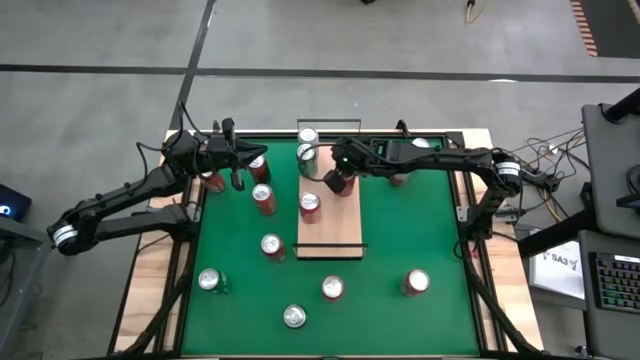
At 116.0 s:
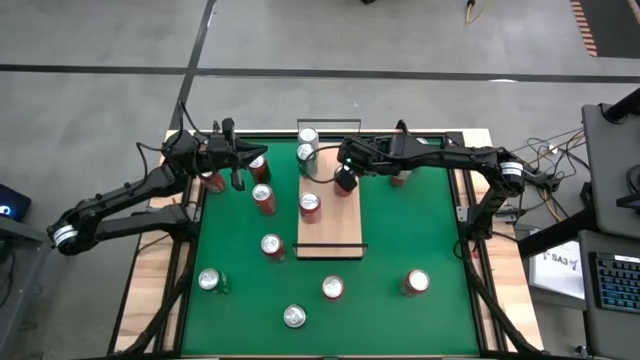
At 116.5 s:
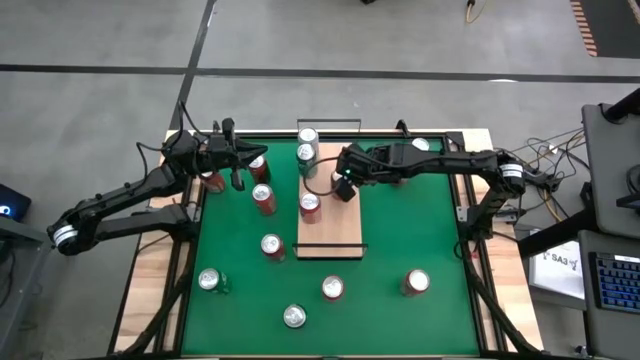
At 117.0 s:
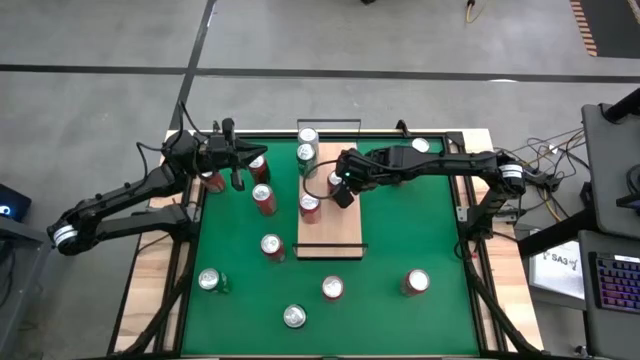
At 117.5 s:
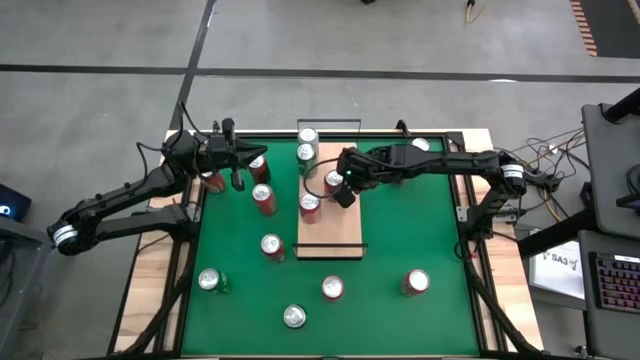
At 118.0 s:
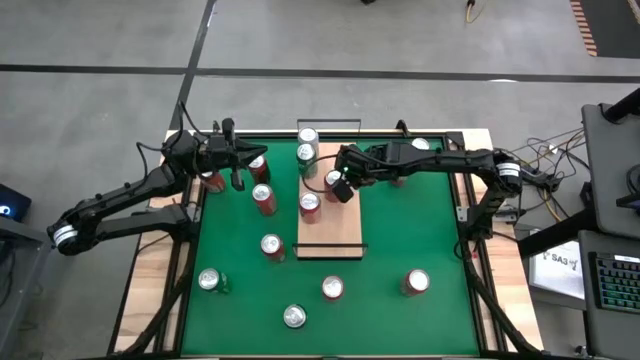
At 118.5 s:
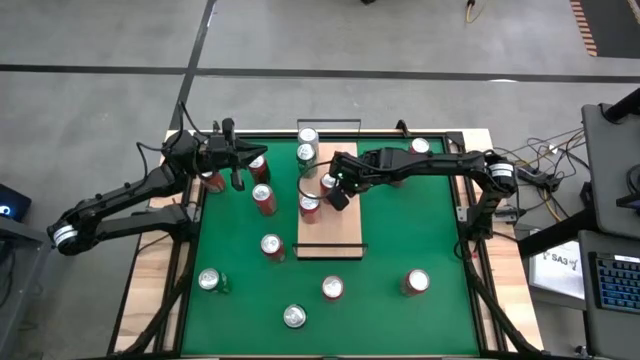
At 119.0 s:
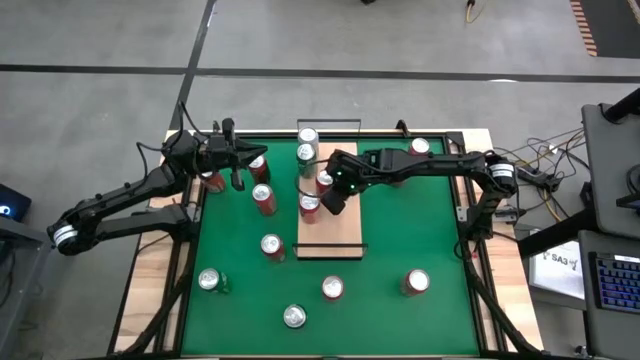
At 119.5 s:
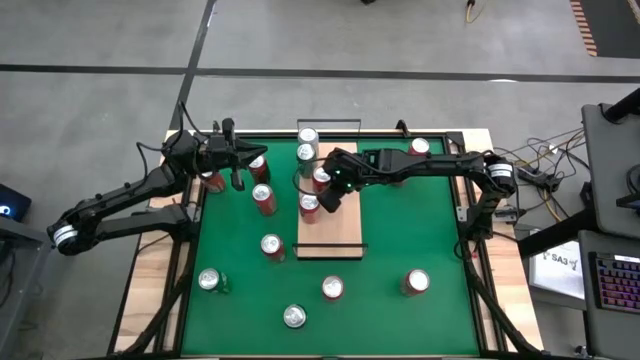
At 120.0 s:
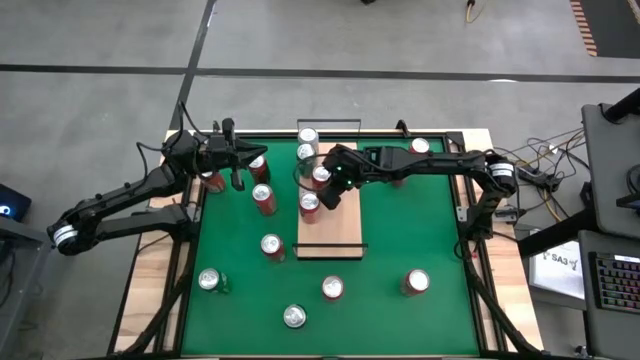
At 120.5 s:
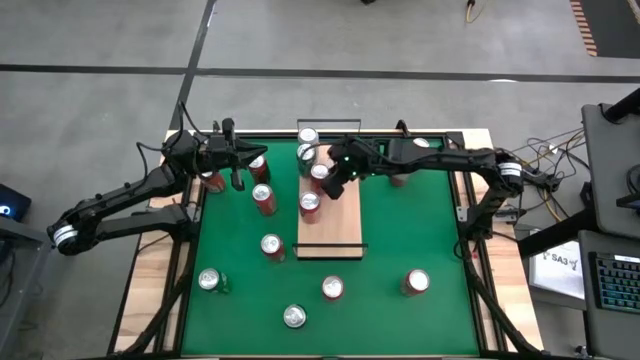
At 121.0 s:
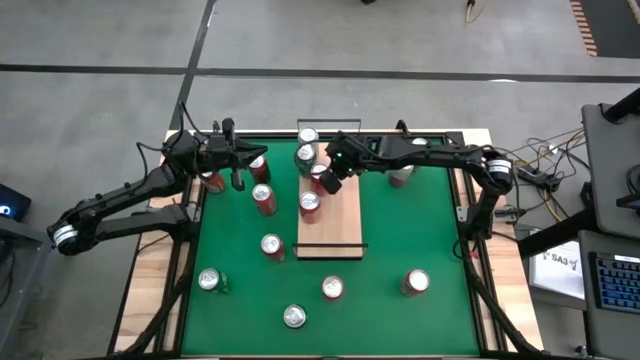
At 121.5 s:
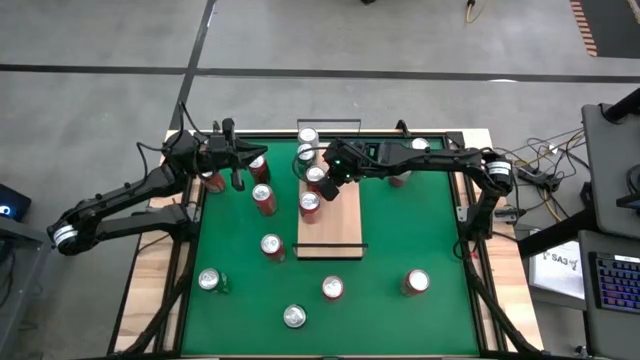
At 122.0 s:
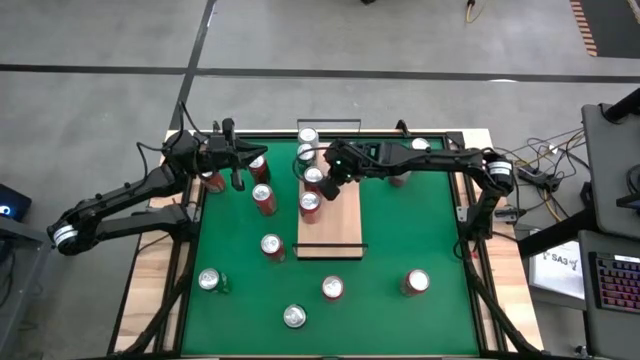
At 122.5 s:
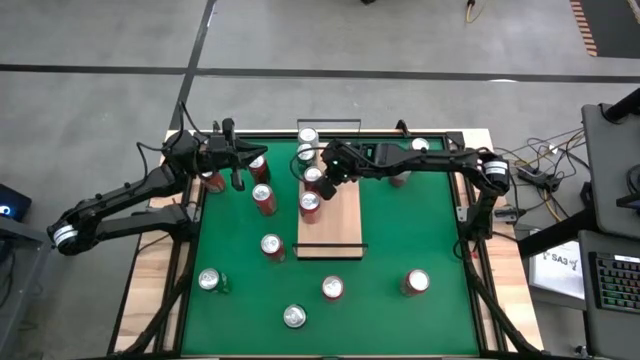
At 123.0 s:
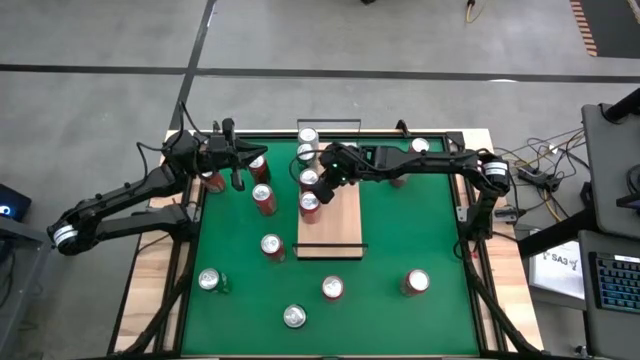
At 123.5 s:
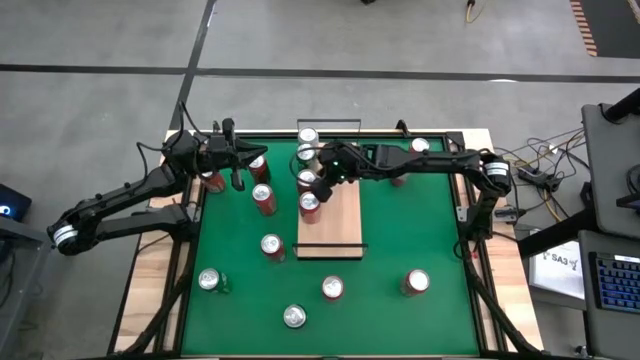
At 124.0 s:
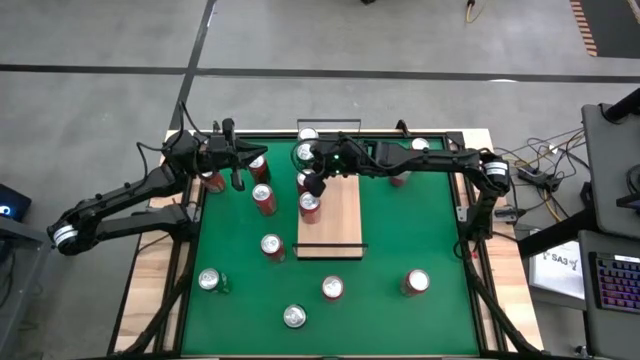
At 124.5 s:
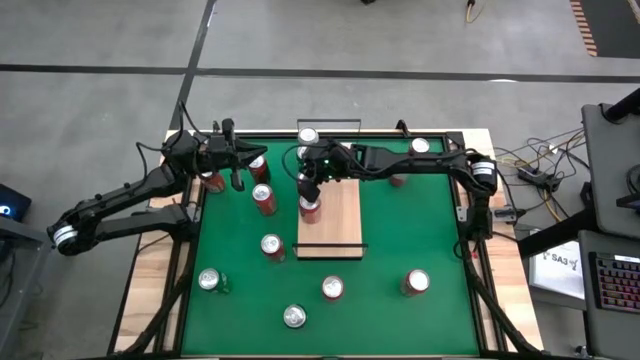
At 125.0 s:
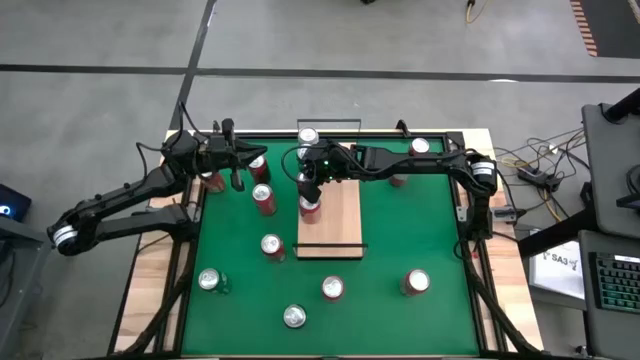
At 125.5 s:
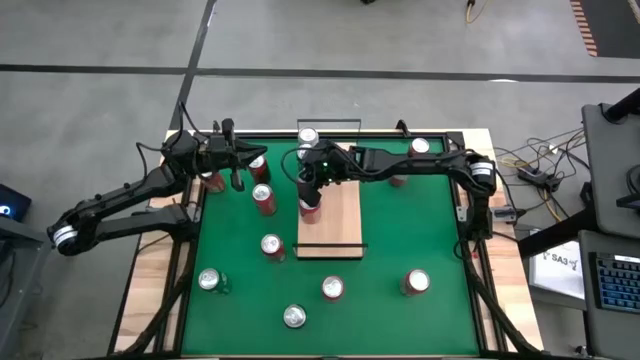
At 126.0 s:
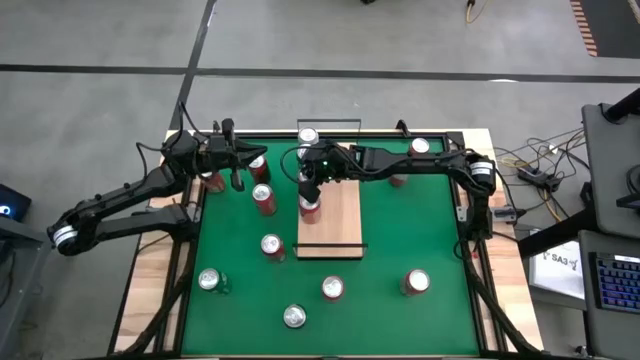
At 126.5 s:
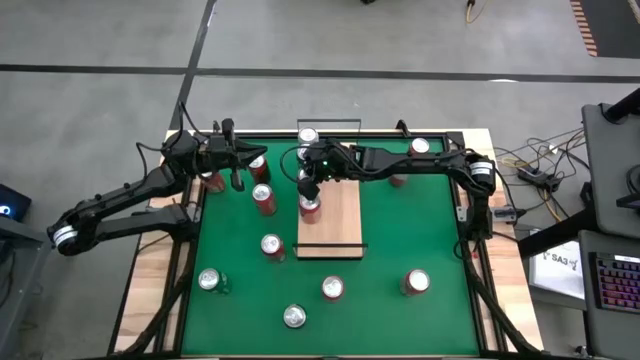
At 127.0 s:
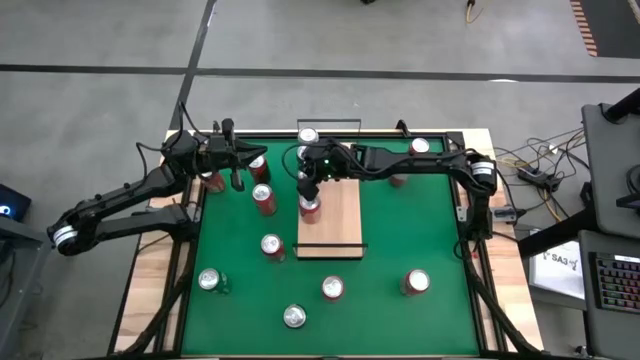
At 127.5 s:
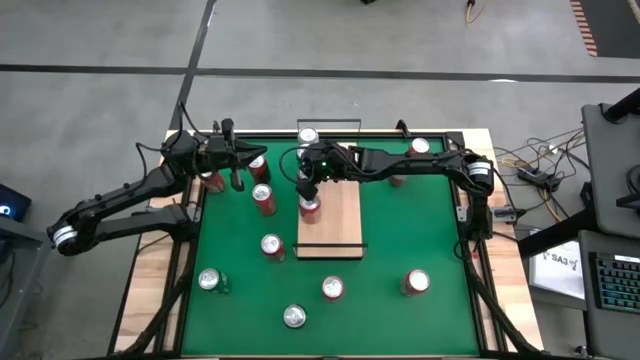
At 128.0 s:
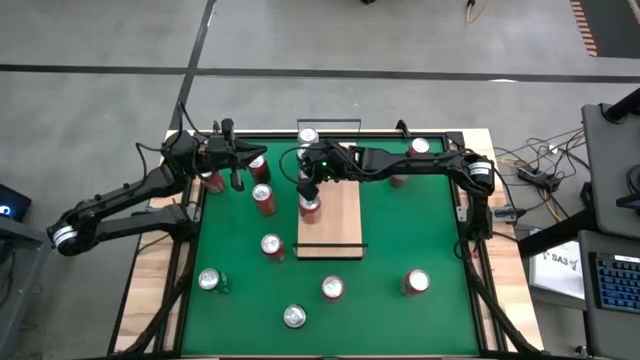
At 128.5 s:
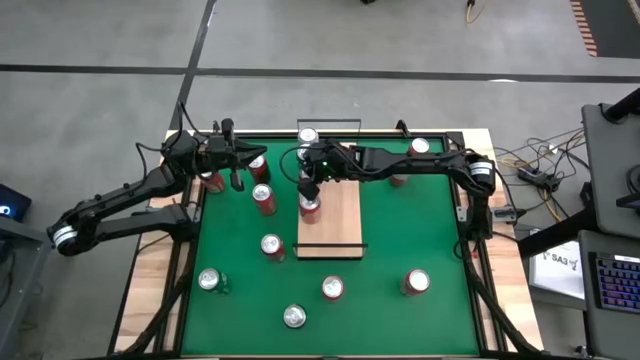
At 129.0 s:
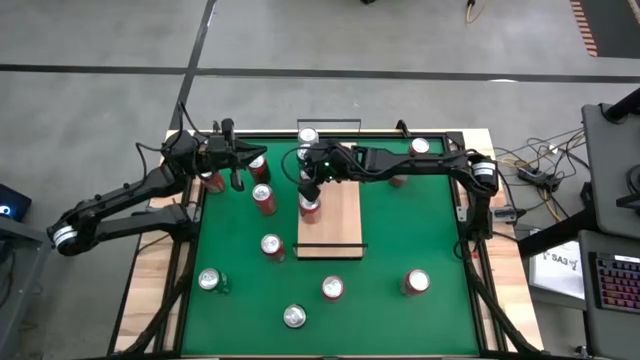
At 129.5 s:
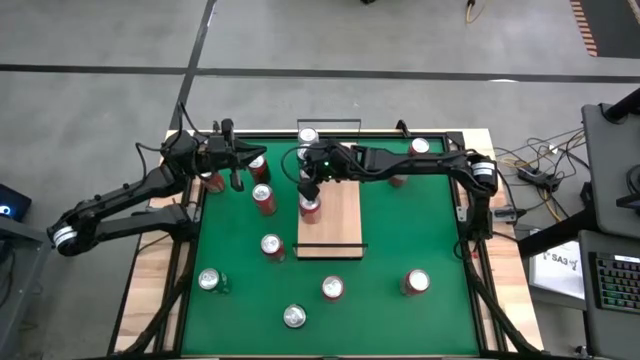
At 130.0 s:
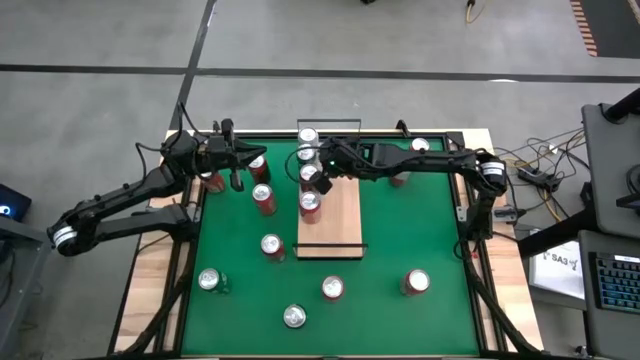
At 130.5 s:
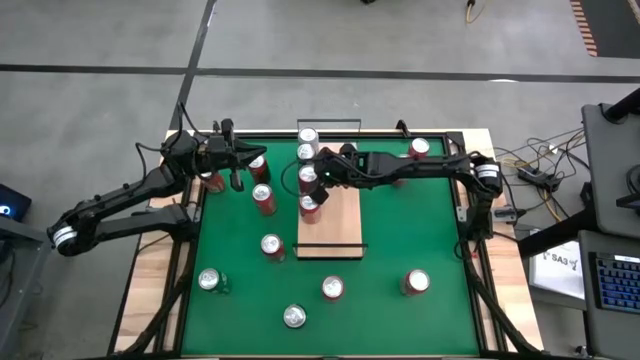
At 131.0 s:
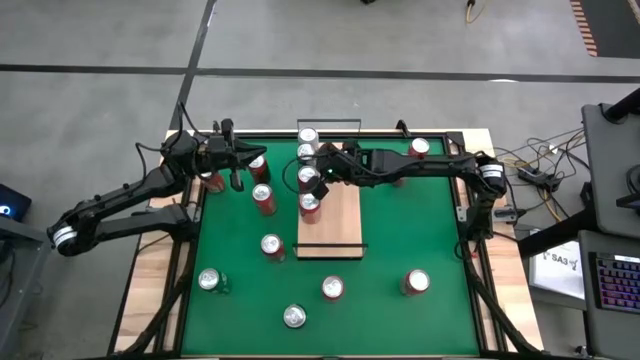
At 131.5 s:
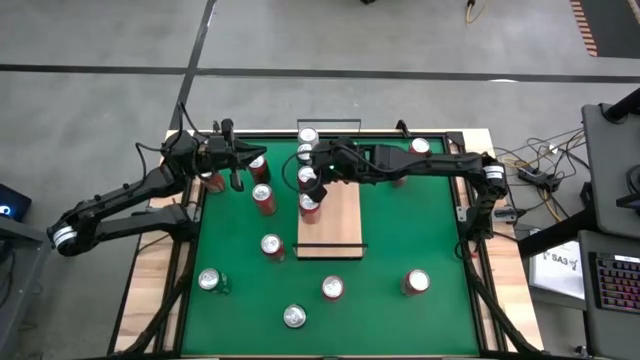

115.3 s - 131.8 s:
Task: Place canned beverage on shelf
Put the right red soda can on the shelf

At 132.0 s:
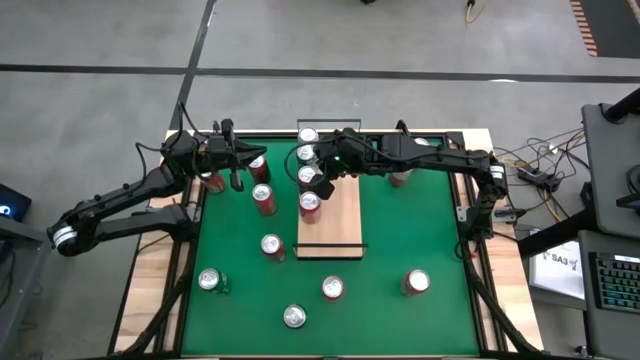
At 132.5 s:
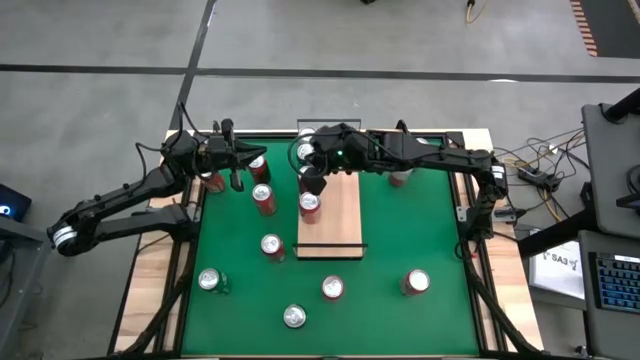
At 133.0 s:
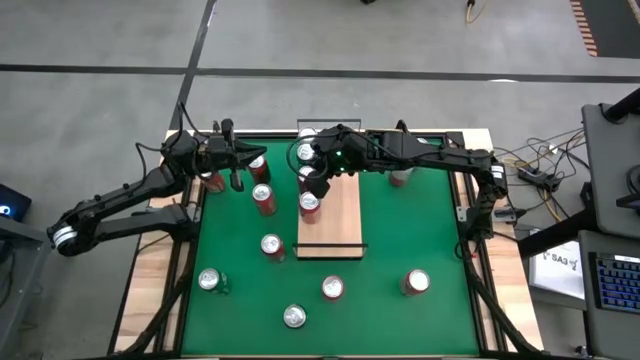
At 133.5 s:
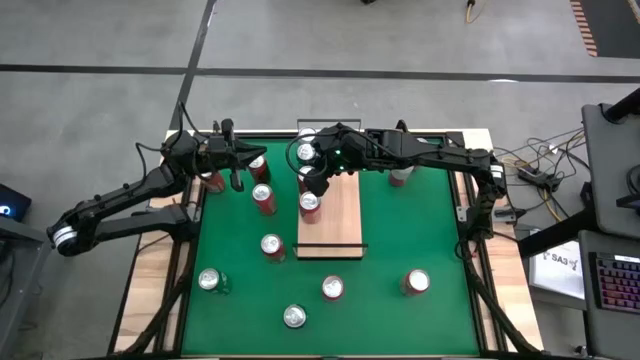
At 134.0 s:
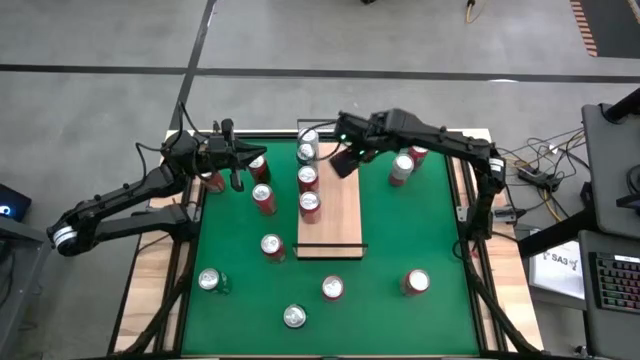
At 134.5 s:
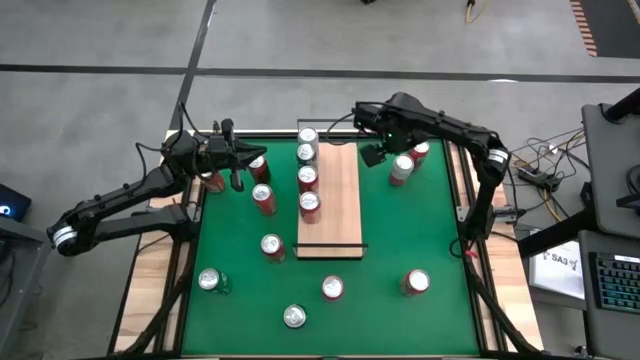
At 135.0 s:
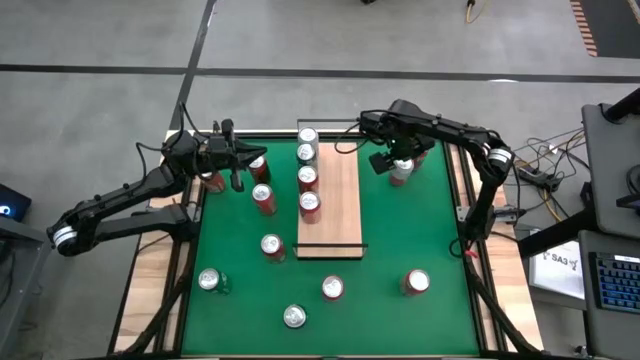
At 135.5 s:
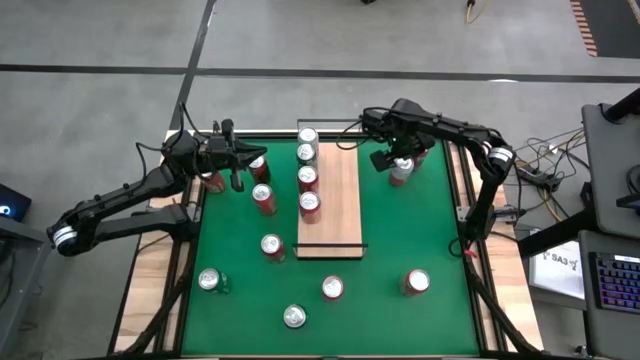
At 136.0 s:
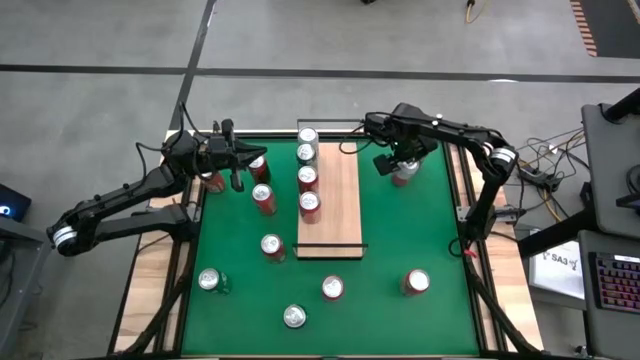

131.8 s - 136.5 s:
Put the white/pink soda can on the shelf and aligned with the other white/pink soda can

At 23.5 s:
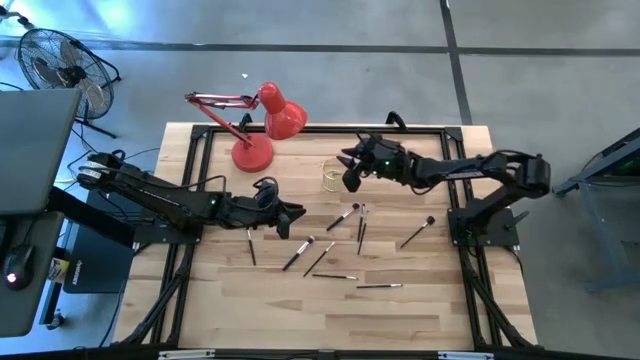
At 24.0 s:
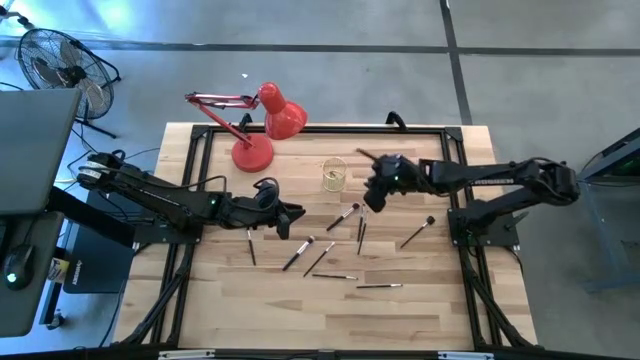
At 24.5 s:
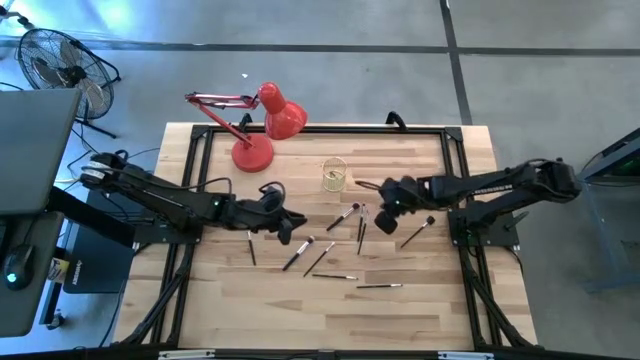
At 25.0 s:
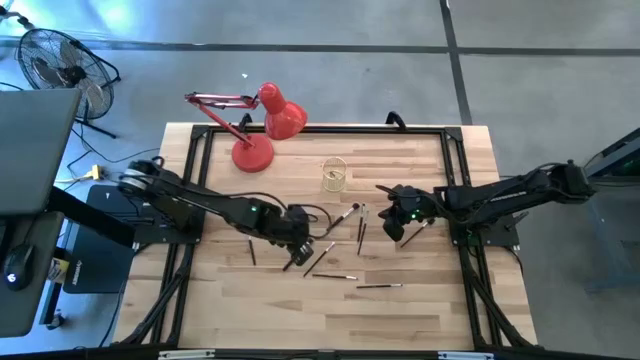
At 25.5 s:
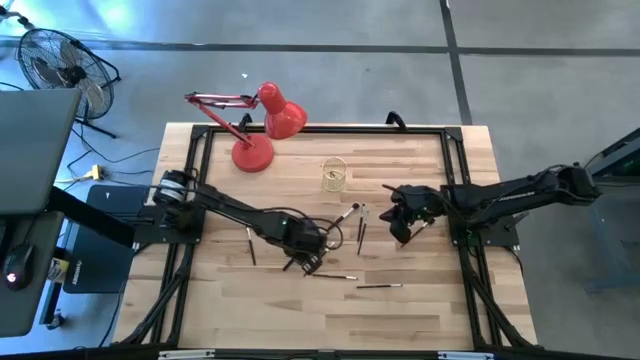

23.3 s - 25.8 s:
Task: Put items in baskets/containers
Put the makeup brush into the wire bin
